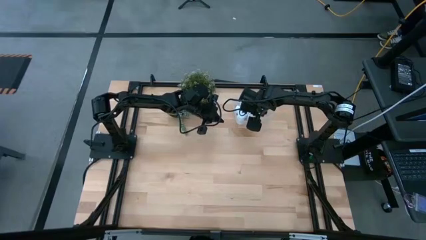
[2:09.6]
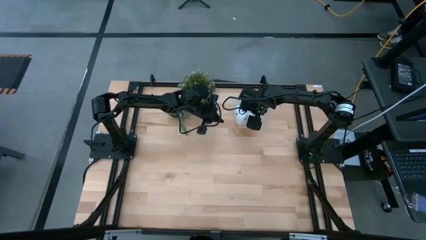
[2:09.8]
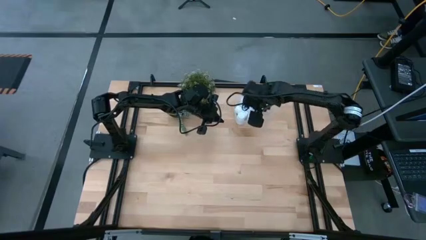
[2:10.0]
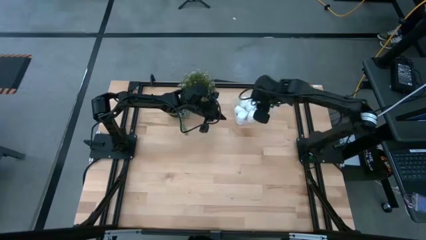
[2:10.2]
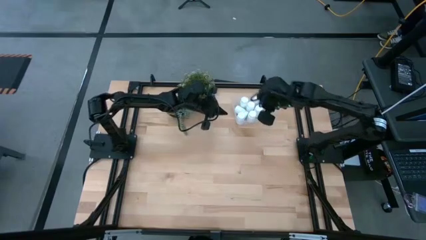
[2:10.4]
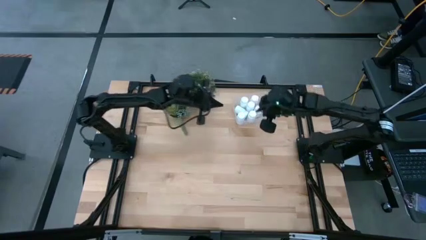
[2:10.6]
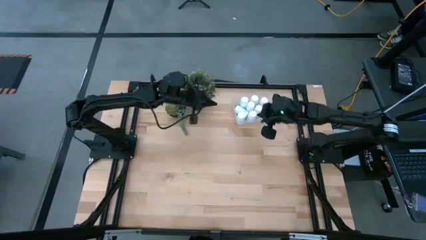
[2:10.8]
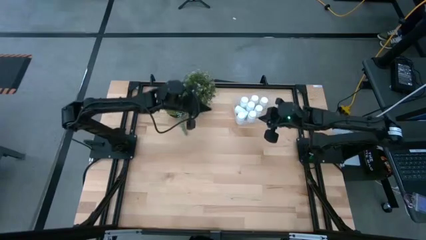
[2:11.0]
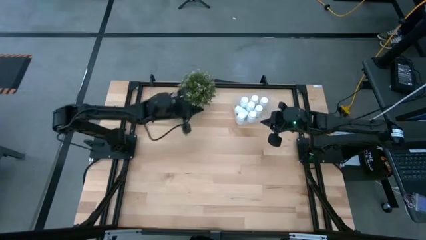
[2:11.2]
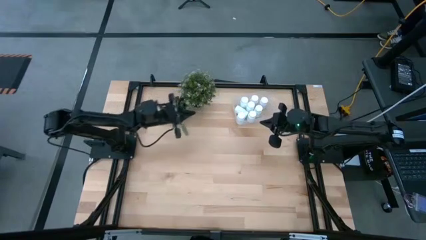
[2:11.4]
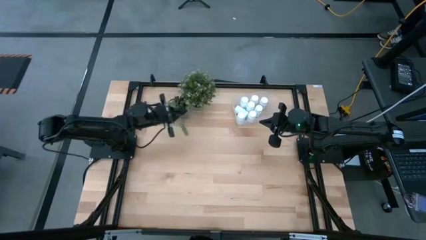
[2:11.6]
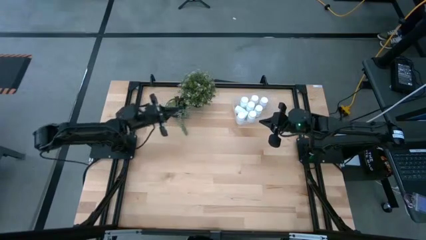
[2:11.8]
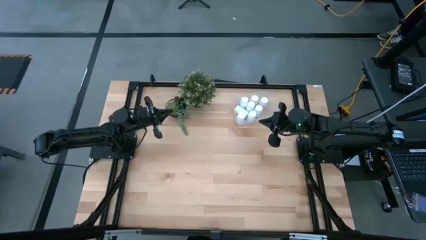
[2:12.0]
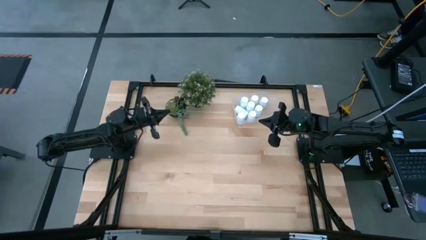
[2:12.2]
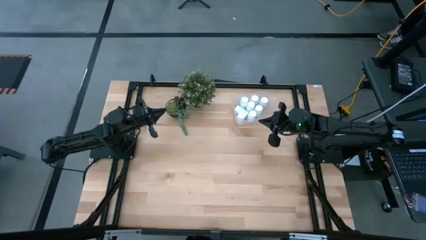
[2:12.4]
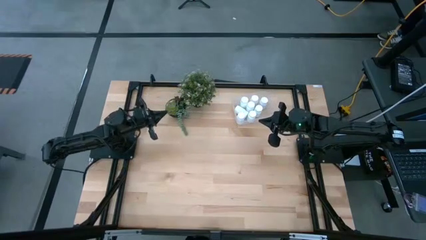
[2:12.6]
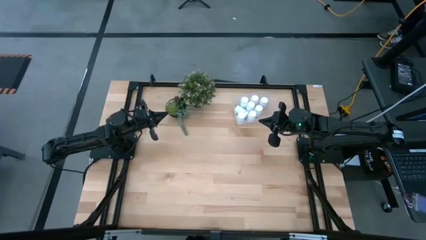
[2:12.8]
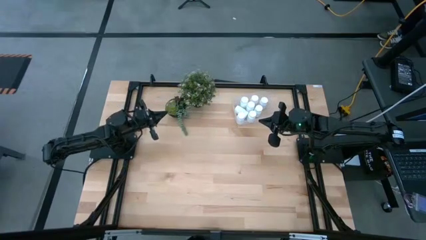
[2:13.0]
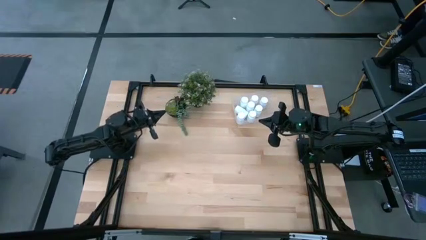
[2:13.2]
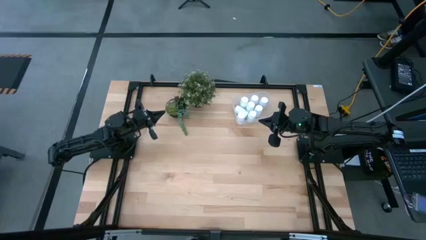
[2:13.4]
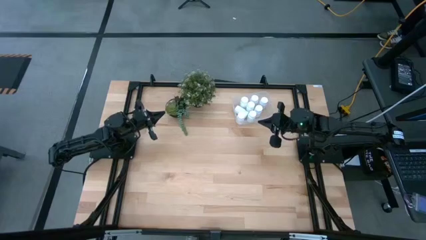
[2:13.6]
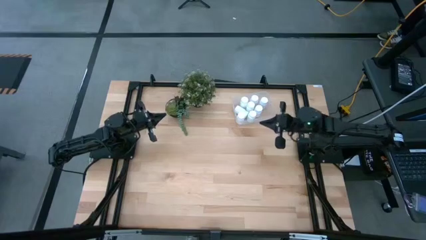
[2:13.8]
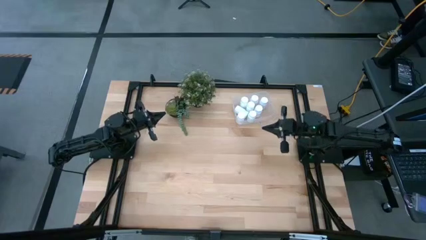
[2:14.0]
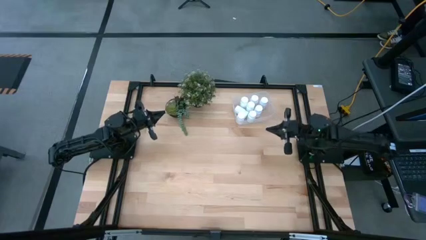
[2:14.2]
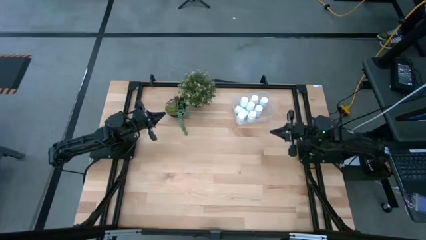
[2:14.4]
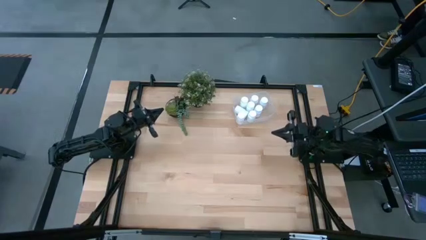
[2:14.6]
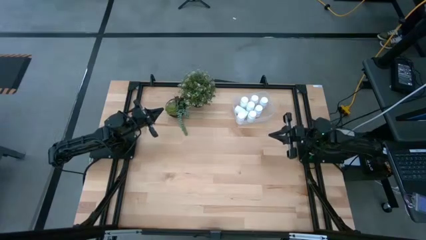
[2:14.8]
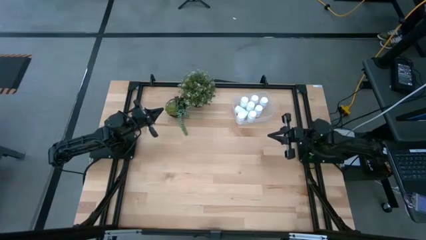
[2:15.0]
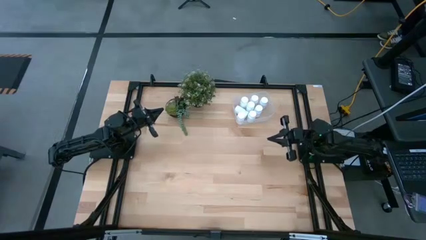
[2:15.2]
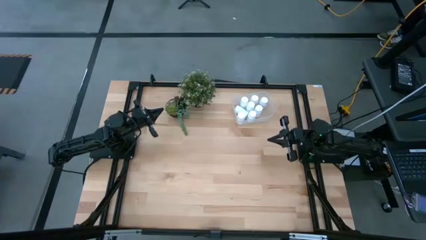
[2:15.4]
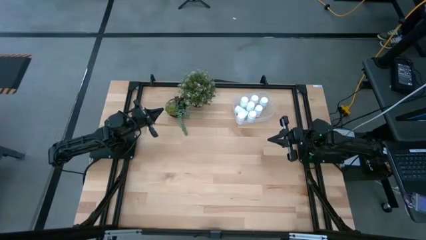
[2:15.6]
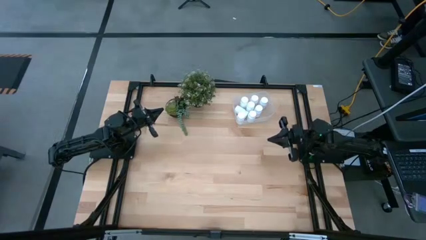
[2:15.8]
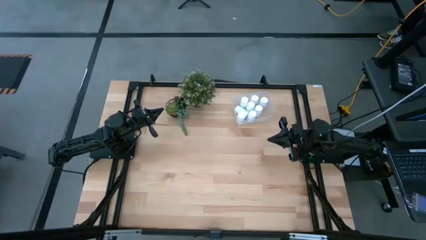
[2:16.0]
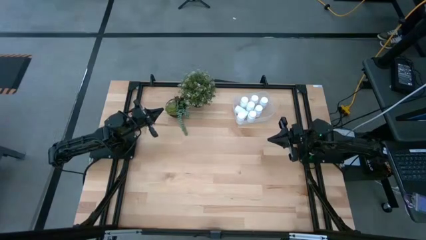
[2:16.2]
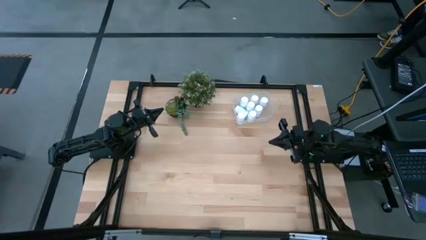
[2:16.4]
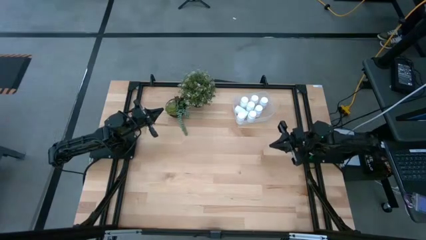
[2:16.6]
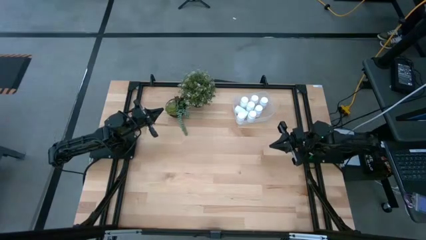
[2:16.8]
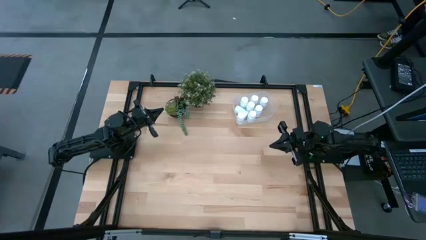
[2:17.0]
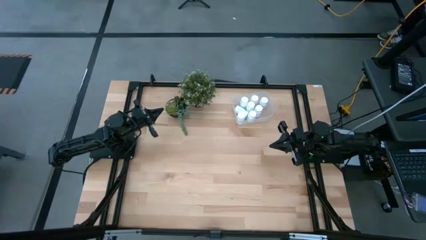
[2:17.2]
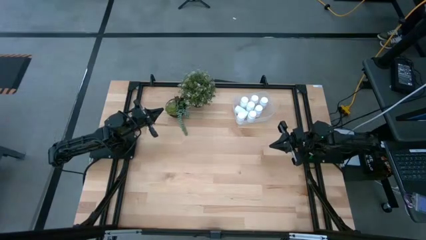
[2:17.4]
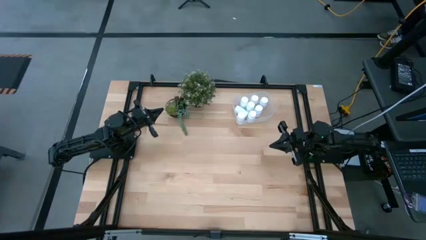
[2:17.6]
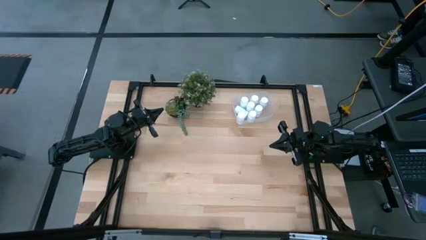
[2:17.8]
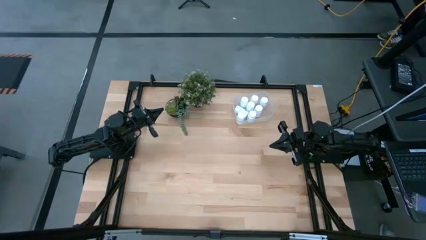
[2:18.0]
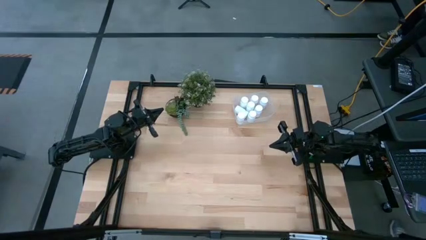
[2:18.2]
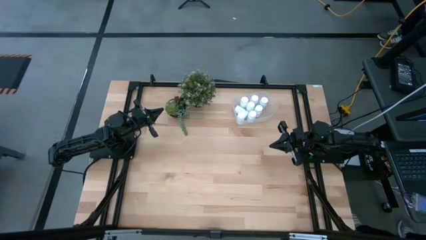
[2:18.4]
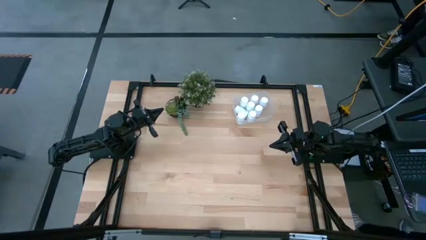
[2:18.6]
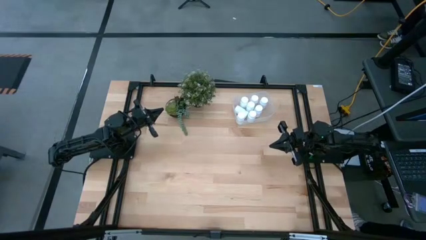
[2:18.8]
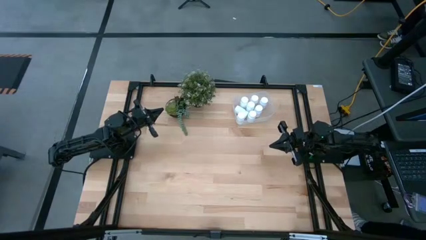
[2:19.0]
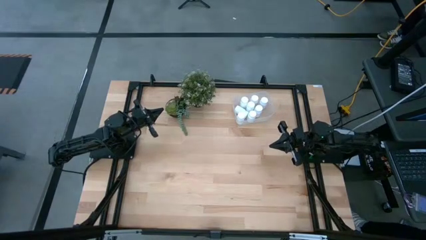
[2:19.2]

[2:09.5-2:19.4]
Task: Pick and place pill bottles into a basket
Return to Home Position

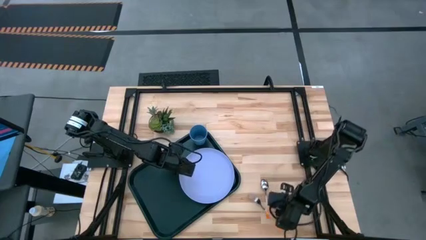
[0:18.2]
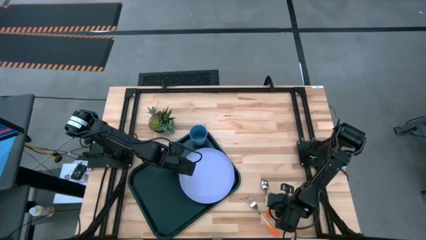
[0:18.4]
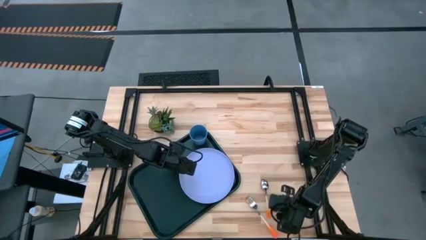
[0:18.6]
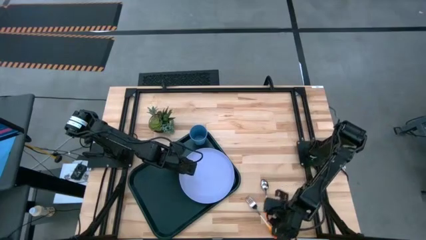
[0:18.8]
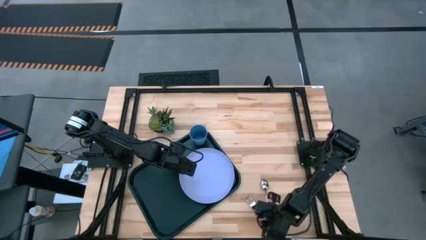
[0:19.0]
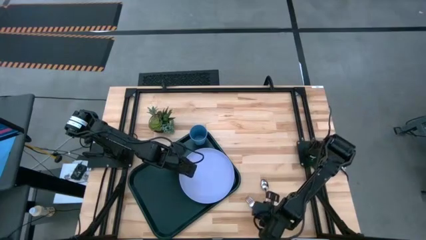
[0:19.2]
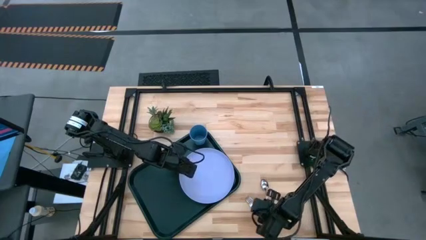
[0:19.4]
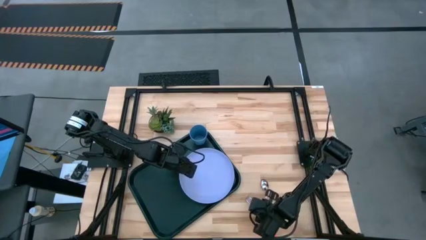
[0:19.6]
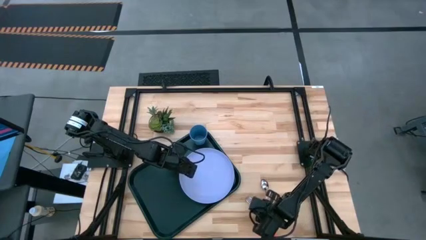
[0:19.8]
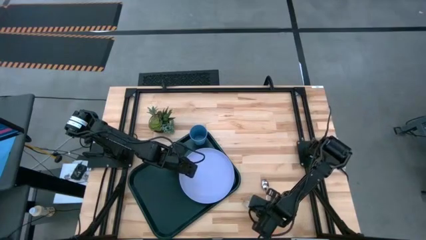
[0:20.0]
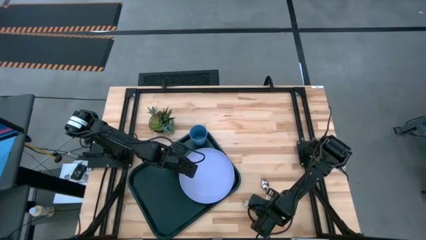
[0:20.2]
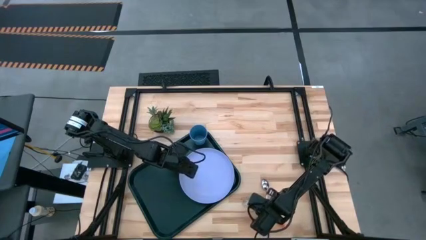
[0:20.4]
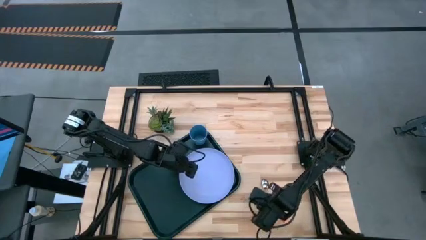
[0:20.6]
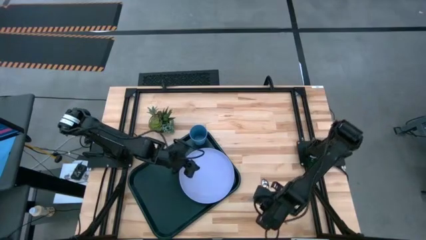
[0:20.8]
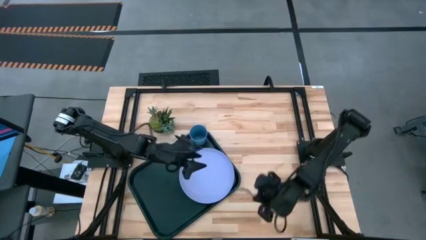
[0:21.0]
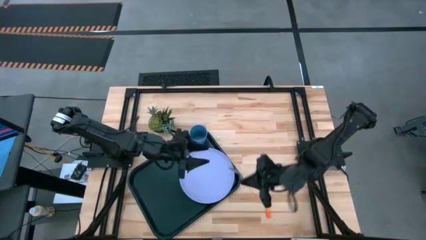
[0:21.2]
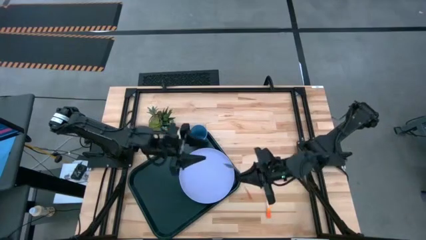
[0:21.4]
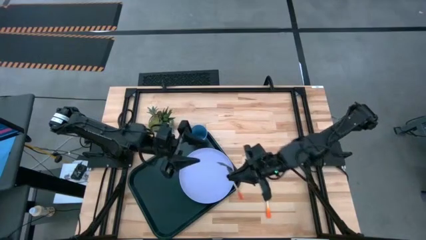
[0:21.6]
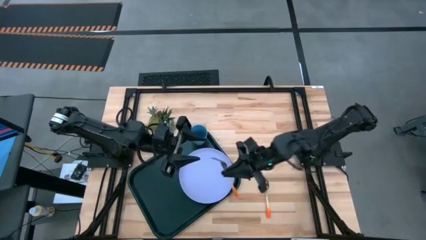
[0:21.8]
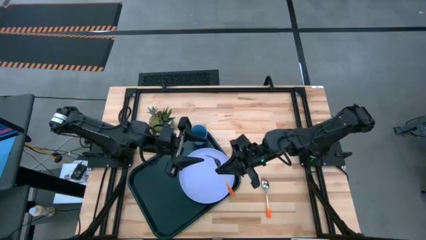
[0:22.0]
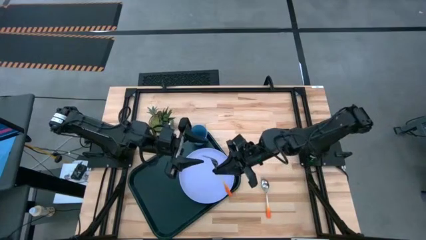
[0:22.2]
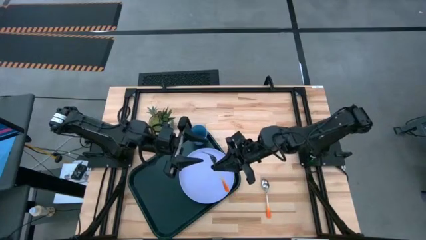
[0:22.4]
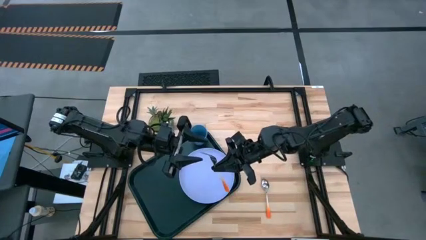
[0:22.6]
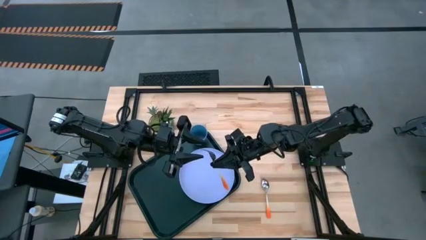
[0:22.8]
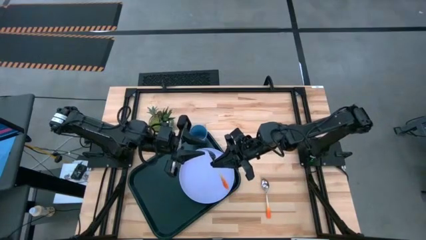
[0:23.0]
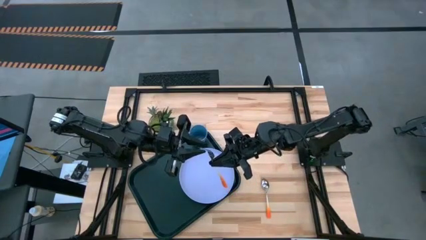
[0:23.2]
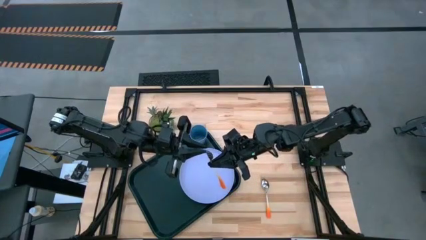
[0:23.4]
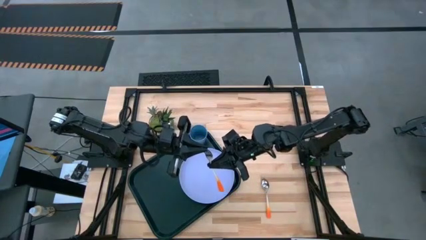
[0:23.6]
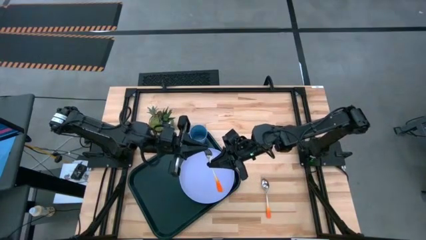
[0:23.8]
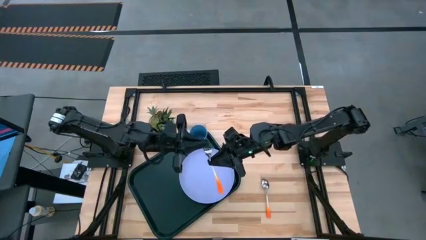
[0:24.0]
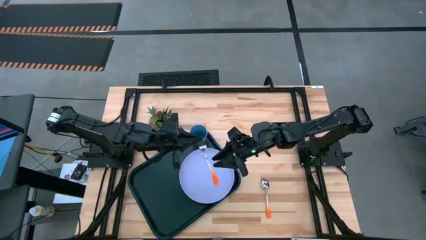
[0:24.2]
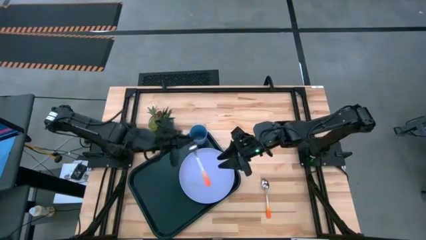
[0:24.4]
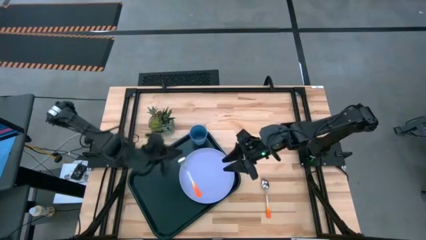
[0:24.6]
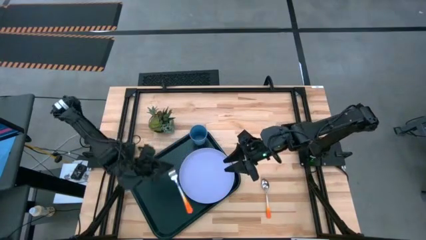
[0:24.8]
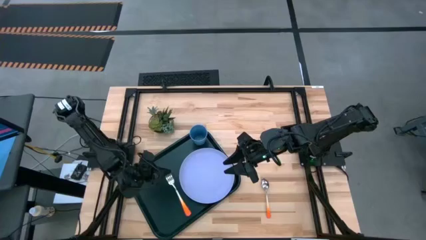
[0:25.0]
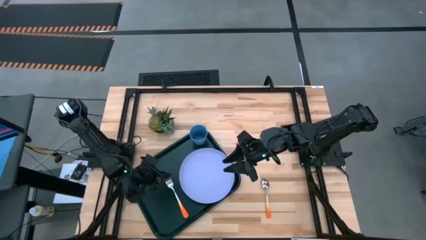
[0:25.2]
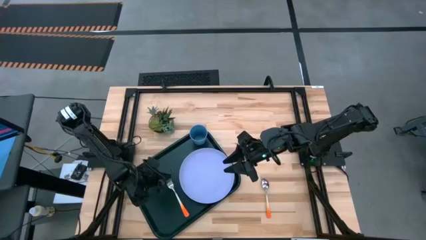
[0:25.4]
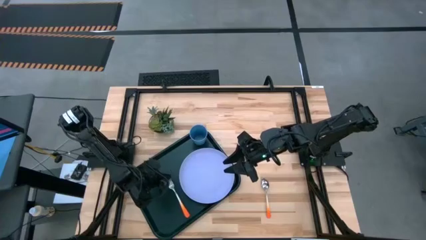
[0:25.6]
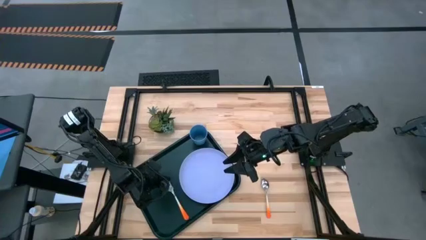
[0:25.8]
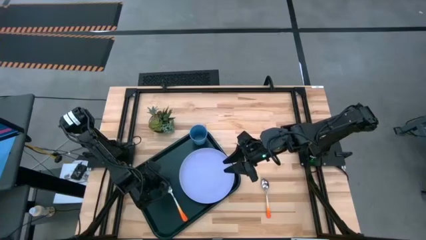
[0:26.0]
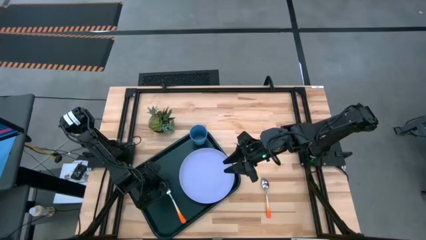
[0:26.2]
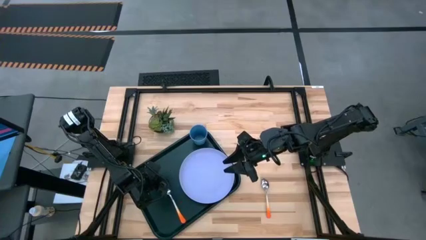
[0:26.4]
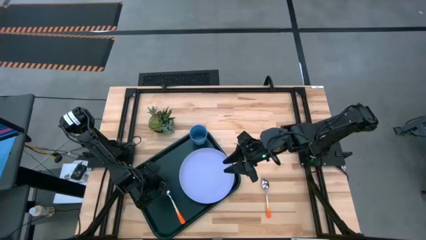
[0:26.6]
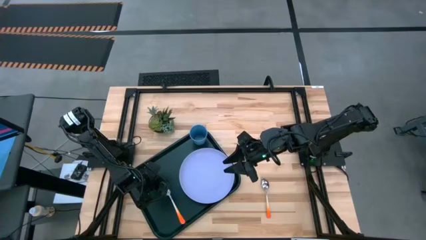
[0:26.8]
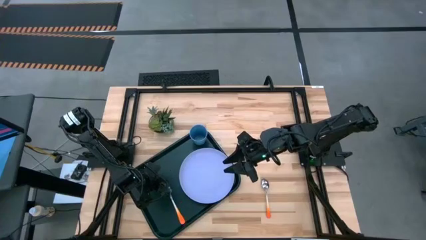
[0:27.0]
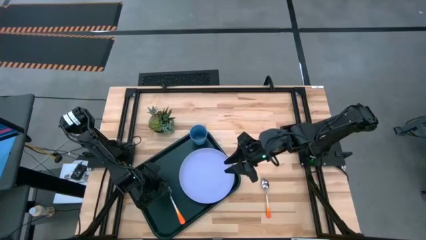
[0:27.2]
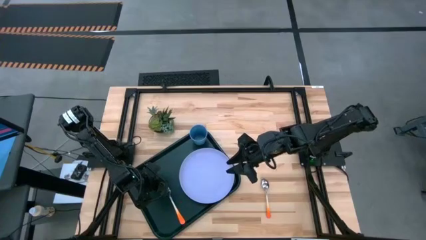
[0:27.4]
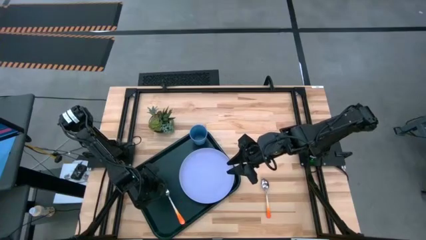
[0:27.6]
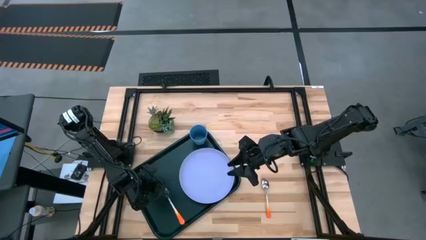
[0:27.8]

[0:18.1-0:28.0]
Task: Pick and place plate/cup/fork/spoon on tray
Put the orange fork on the black serving tray to the left of the purple plate
